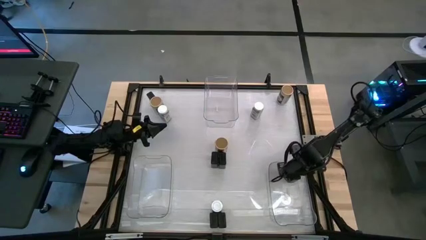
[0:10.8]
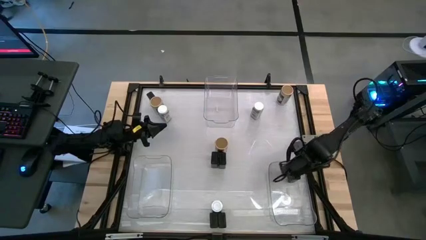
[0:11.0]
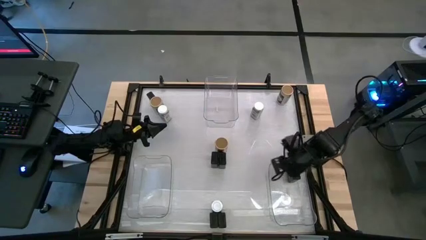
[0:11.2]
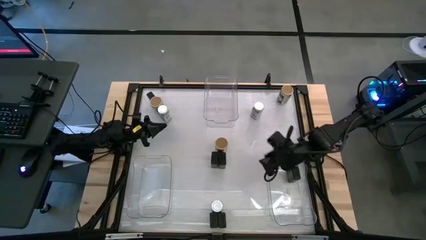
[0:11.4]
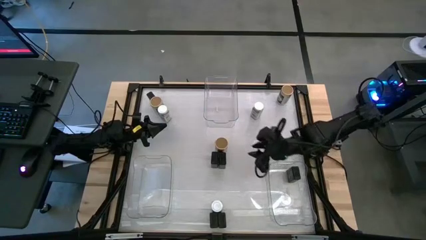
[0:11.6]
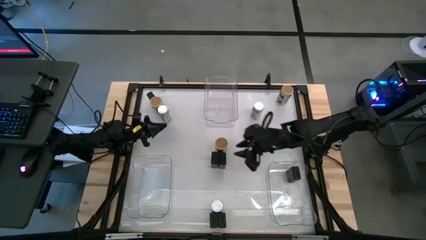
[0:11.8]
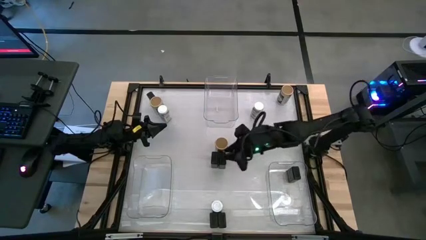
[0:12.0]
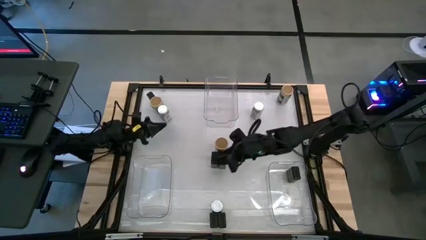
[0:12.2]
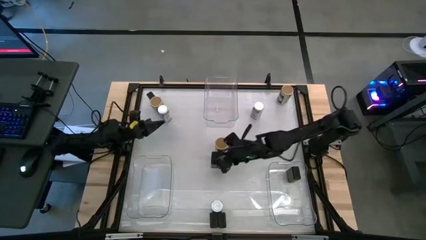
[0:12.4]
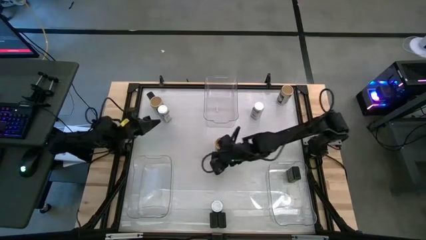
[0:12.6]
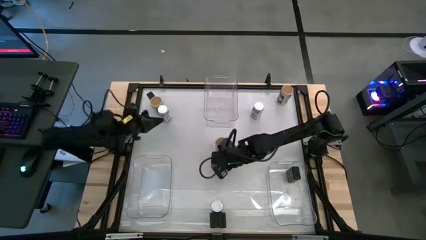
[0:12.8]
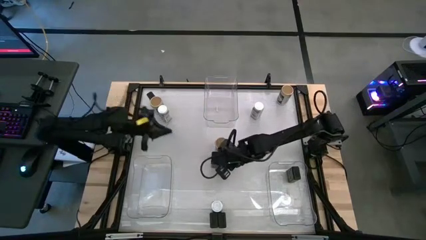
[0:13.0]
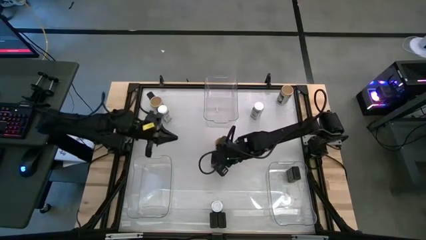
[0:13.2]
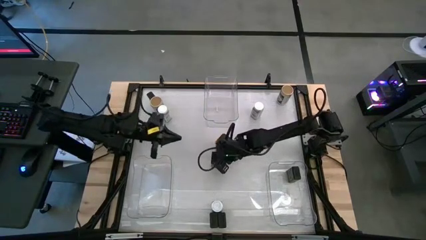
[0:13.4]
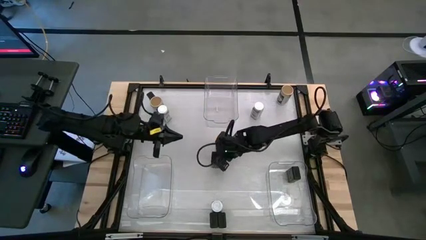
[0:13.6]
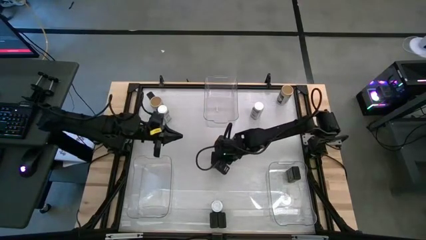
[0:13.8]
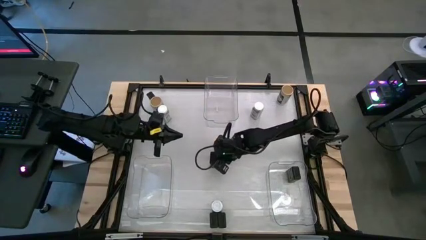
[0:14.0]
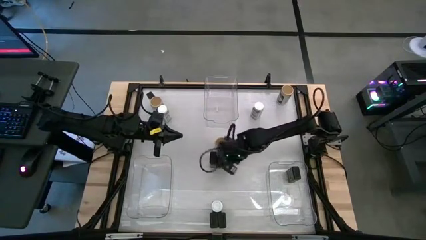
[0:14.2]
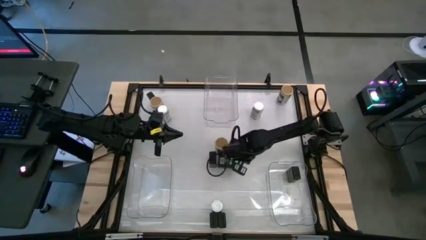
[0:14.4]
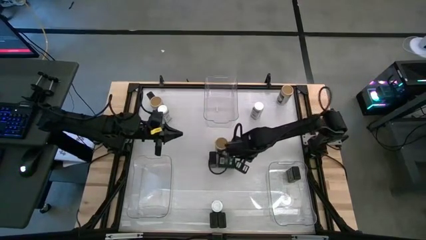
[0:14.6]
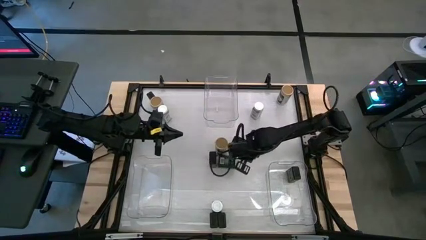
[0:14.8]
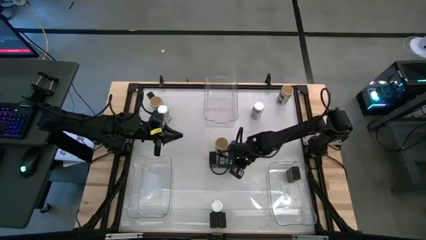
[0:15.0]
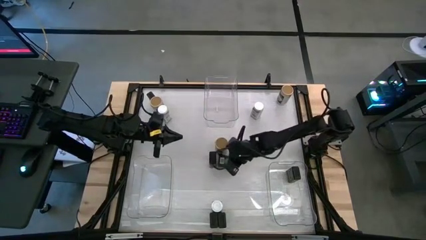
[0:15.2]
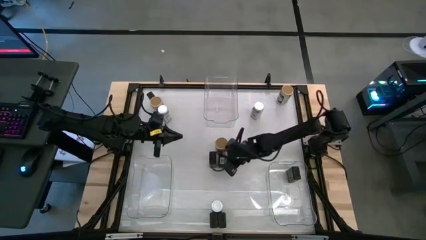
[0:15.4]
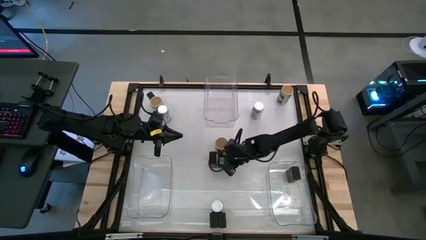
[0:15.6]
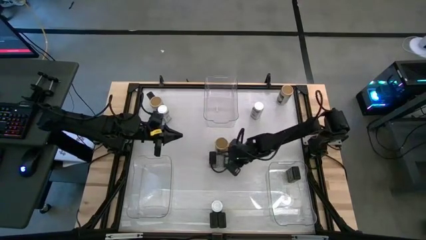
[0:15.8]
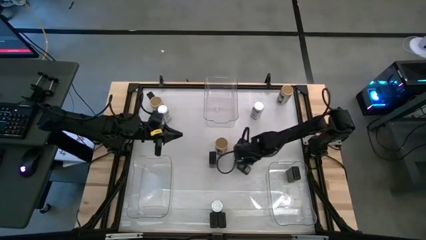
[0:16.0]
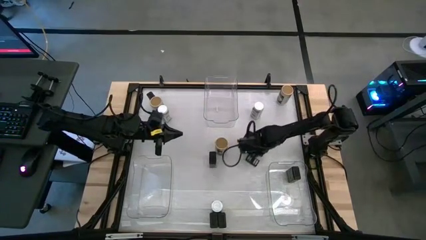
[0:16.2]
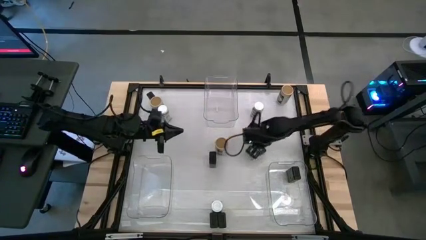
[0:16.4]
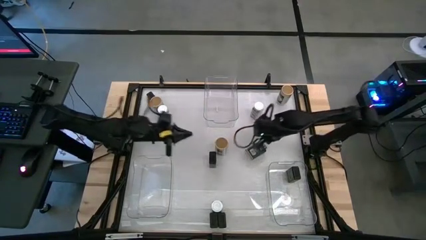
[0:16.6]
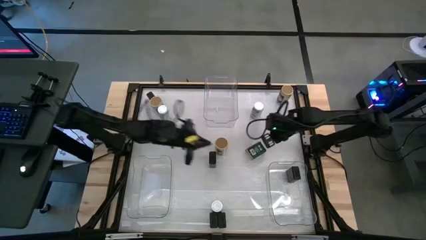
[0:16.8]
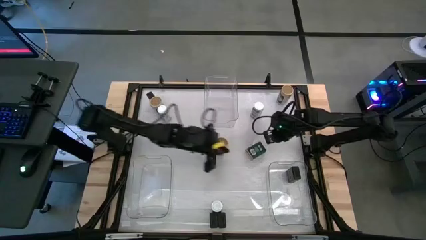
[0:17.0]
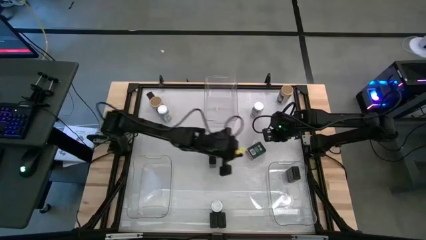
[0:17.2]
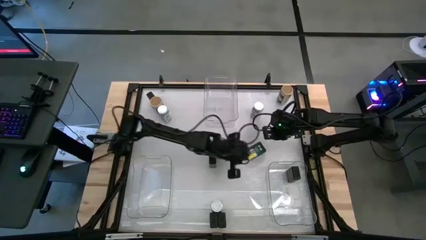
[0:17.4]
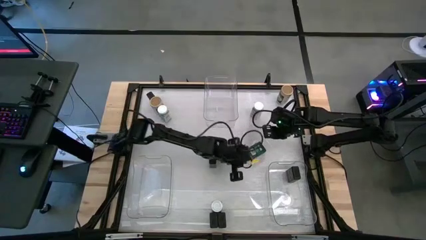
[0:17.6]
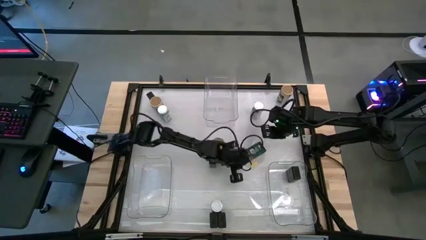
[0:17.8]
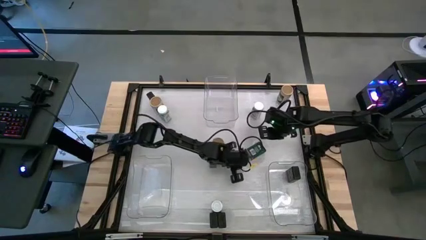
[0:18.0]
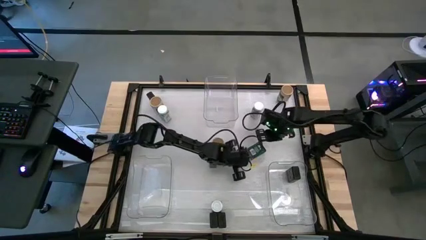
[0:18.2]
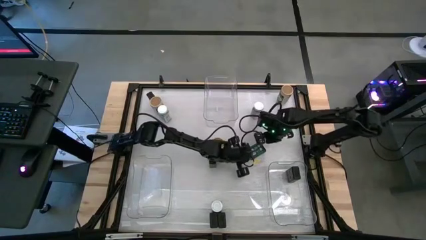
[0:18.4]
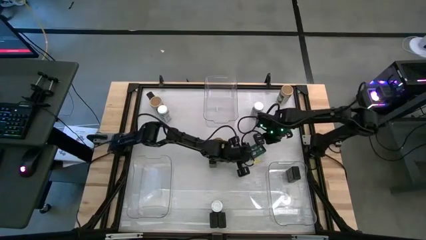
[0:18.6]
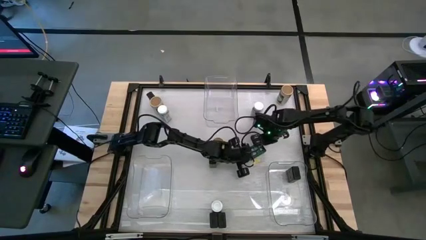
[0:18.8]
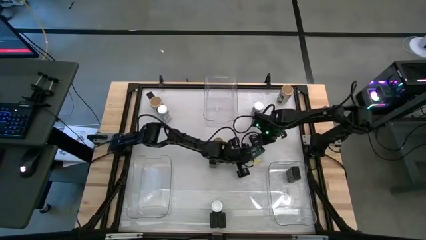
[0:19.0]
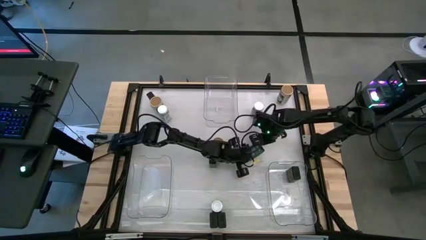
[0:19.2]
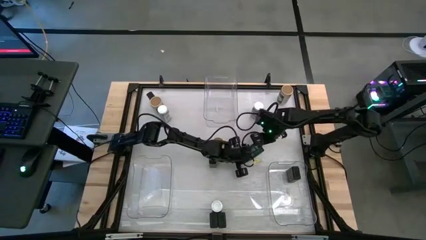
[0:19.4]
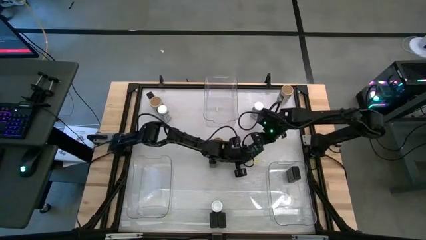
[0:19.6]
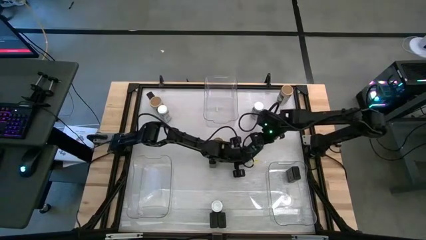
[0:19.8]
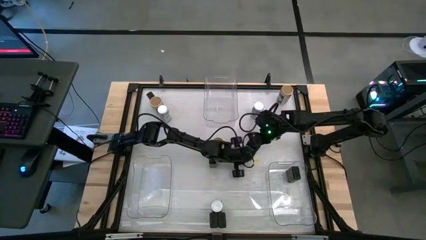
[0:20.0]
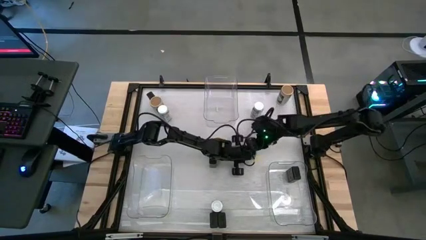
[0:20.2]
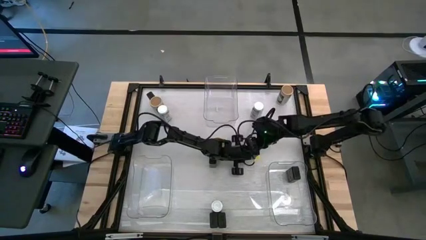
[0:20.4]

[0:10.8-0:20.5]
Task: Sort spices by type
Put the black spice can into the right transparent bin

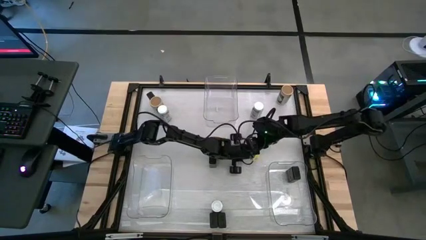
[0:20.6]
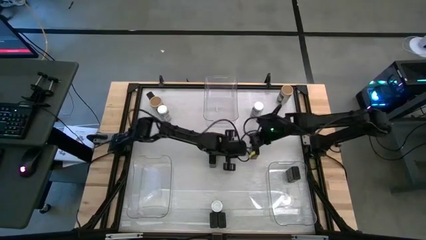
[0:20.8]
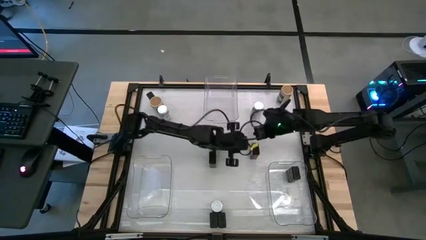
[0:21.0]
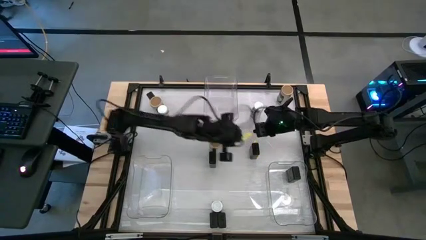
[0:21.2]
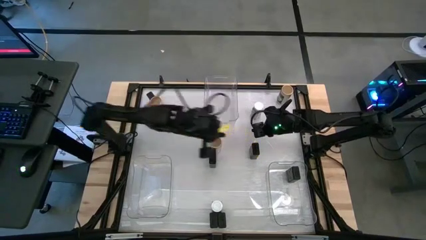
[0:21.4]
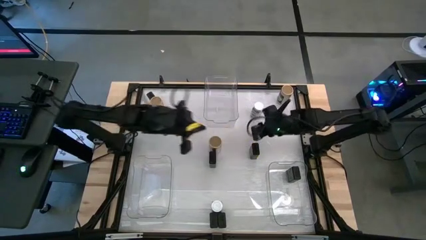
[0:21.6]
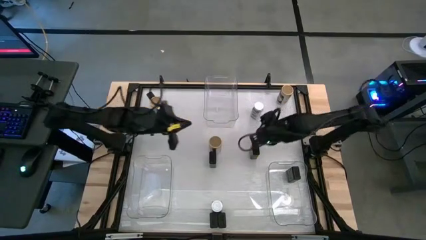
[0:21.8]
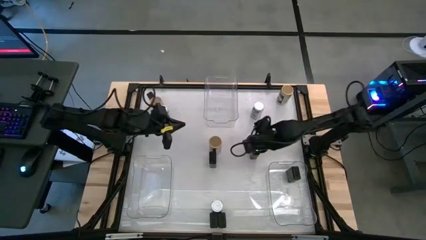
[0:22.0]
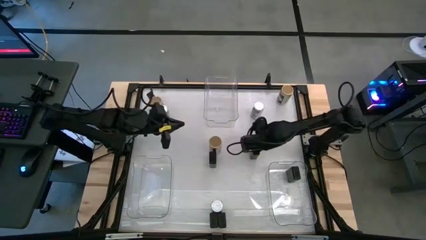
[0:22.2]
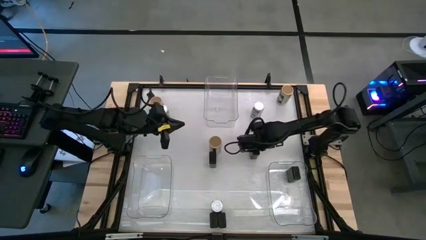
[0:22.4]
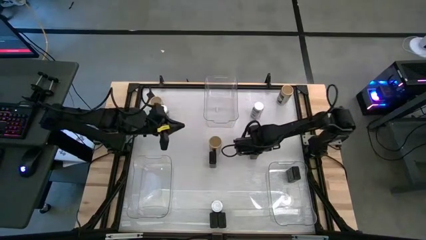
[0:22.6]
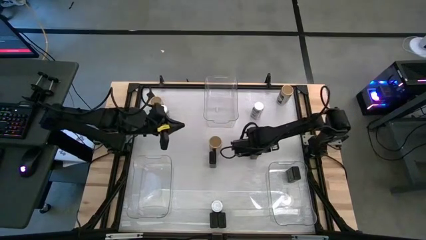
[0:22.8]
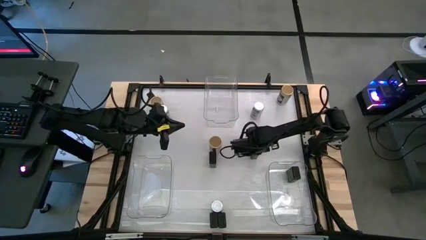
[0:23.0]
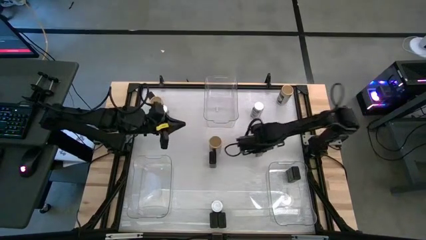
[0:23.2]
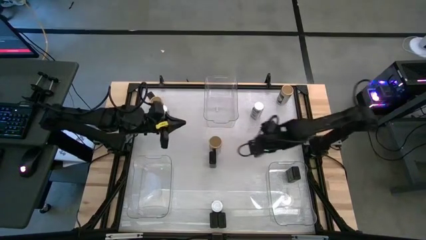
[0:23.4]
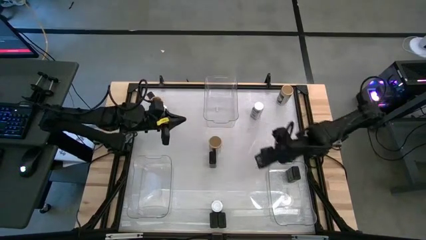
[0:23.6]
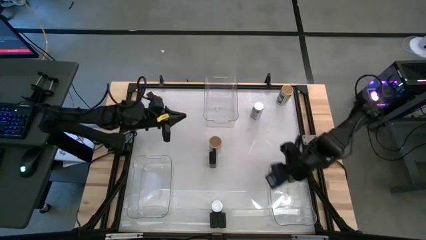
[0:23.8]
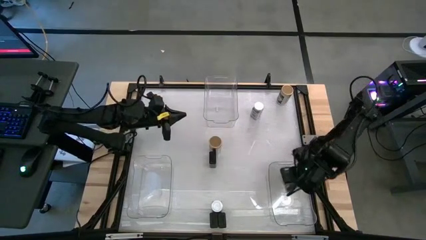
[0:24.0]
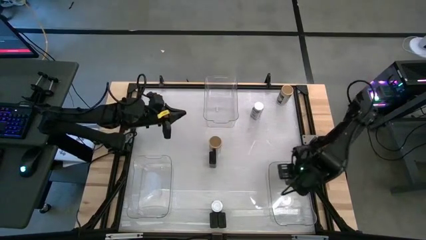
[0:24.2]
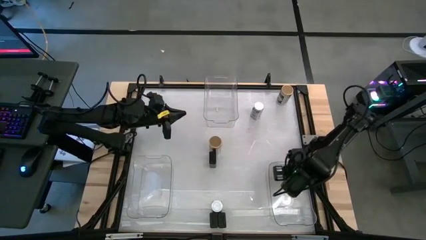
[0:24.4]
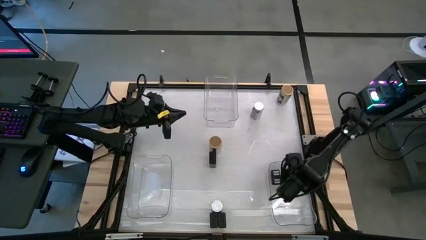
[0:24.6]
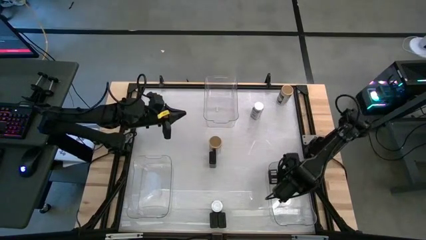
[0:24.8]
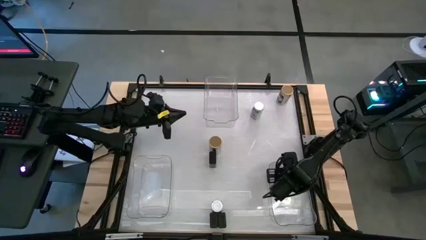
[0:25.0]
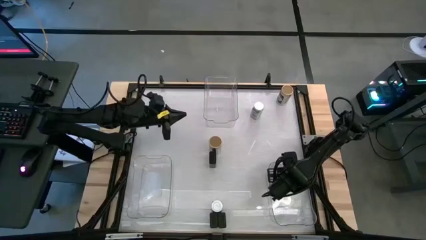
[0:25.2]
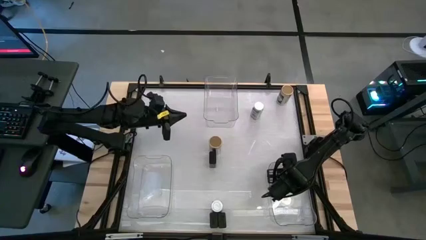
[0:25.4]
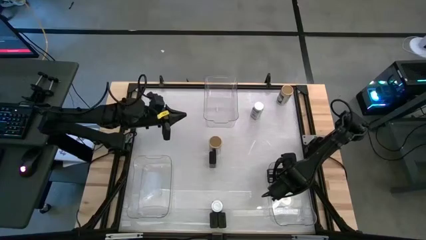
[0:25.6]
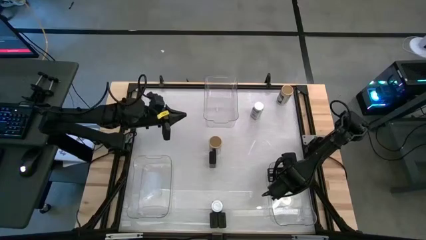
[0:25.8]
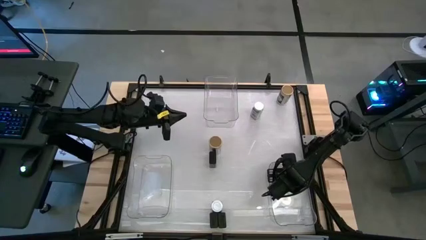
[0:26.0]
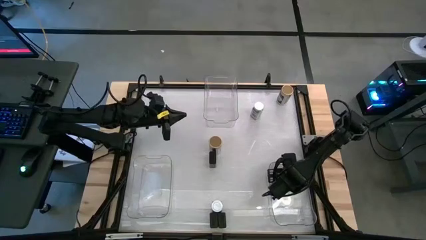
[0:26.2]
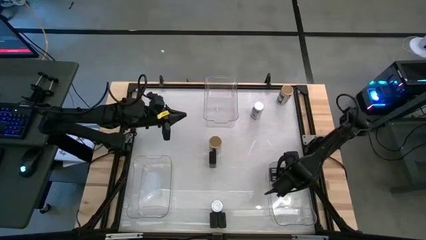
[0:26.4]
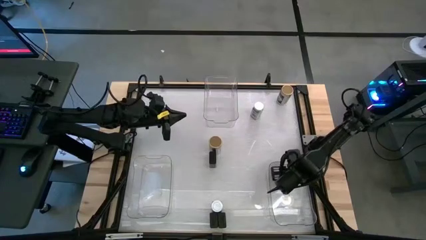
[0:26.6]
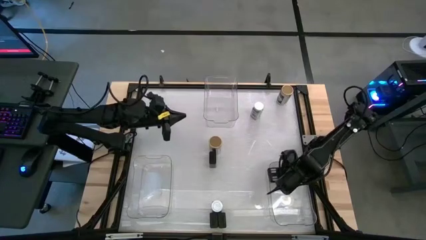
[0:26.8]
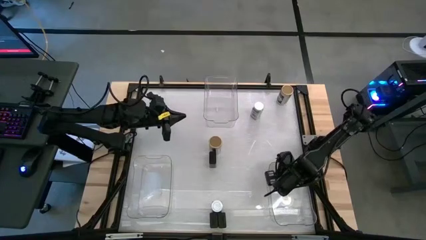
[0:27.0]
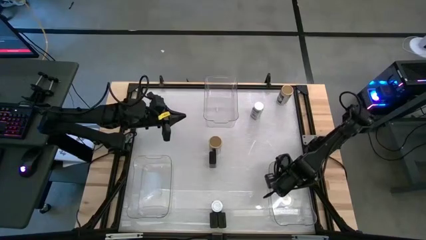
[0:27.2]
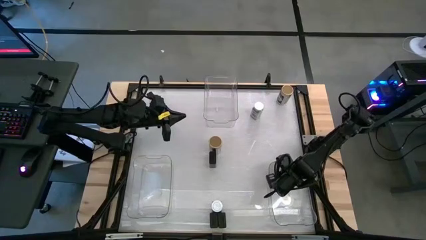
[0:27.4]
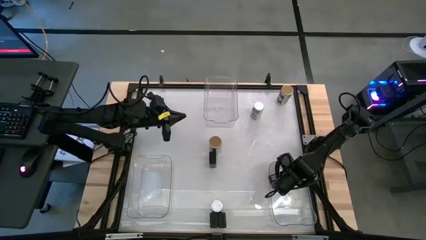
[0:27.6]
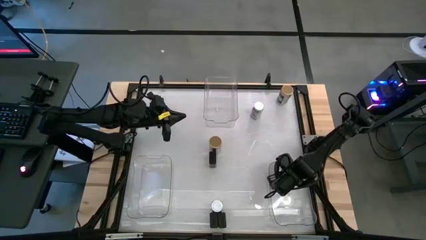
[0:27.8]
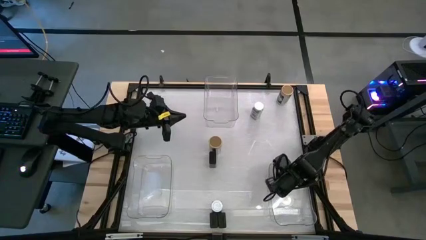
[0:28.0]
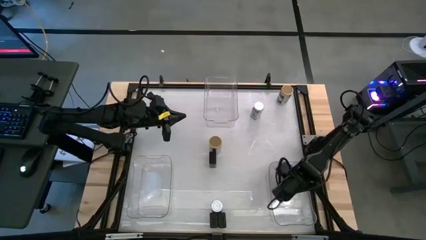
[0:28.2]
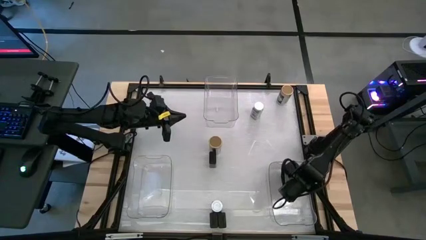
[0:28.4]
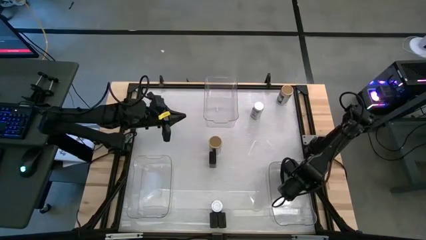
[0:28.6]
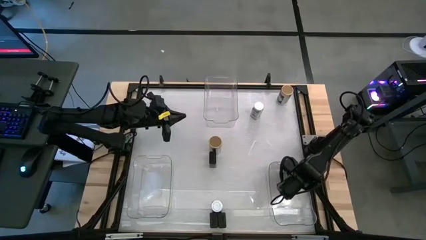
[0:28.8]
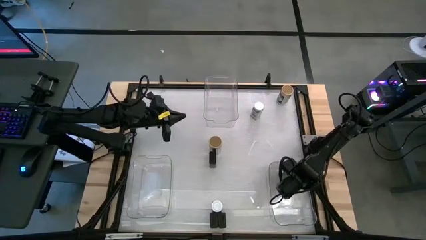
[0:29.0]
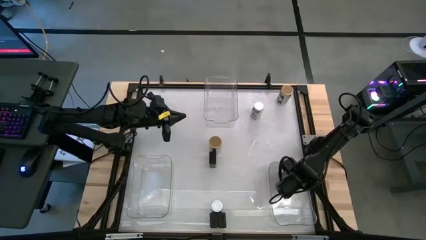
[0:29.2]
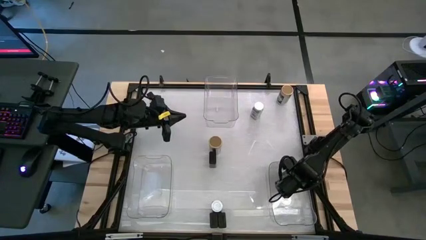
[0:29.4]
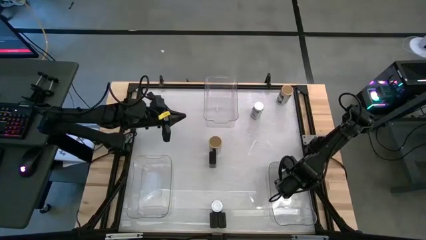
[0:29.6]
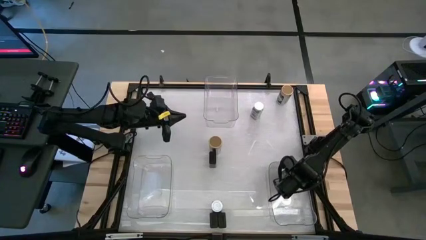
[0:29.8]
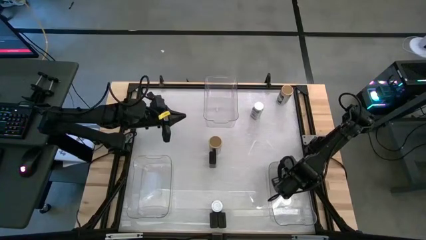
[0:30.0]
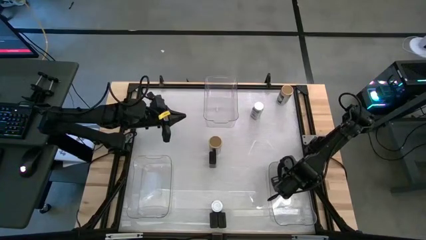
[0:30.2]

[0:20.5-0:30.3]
Put the black spice can into the right transparent bin
